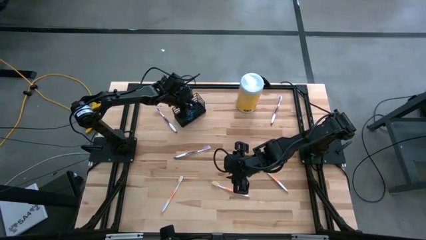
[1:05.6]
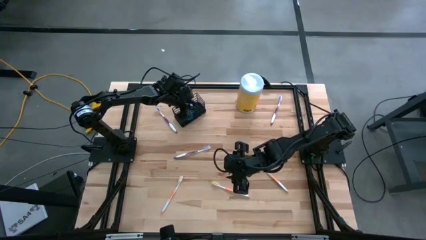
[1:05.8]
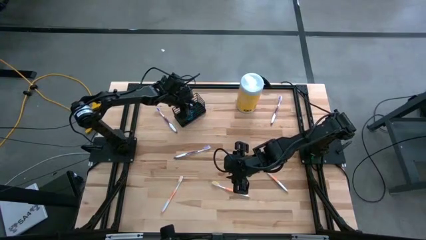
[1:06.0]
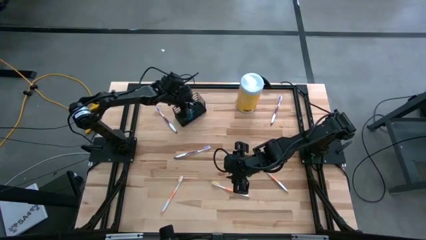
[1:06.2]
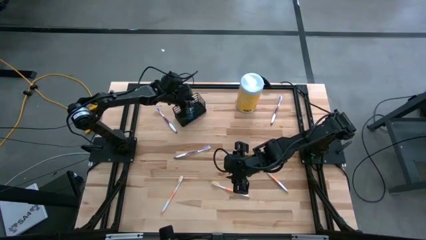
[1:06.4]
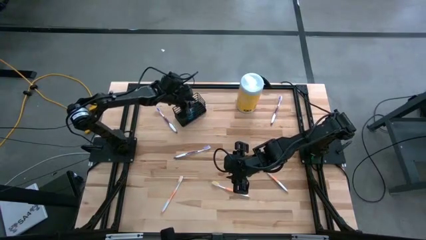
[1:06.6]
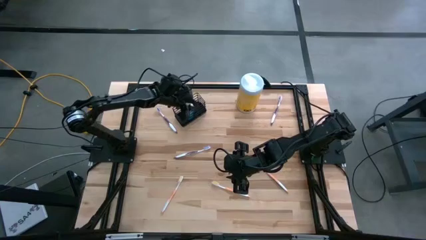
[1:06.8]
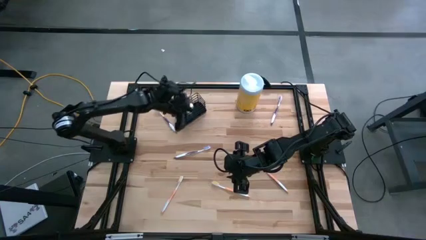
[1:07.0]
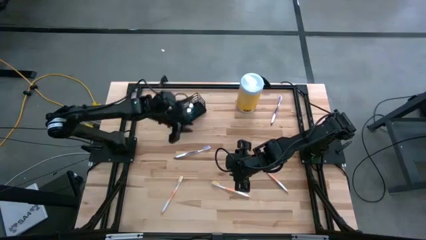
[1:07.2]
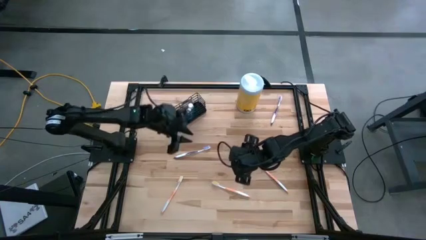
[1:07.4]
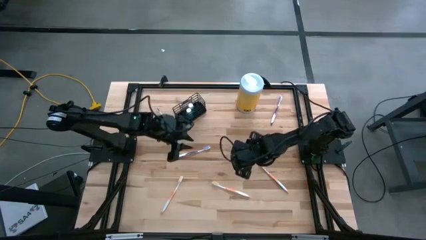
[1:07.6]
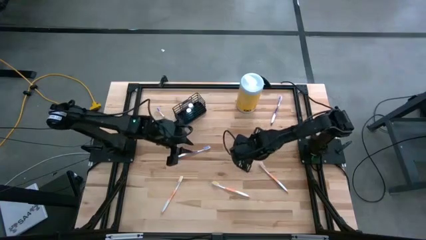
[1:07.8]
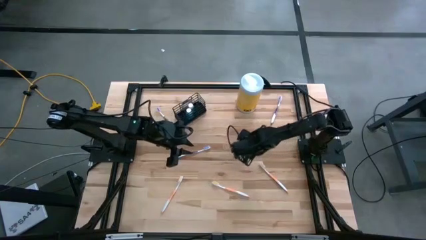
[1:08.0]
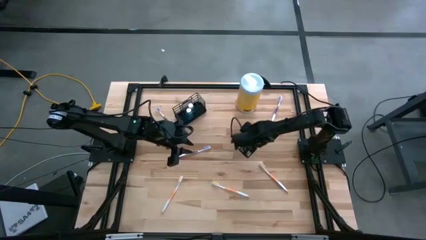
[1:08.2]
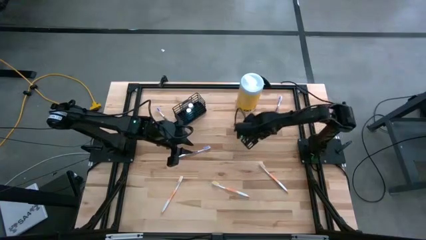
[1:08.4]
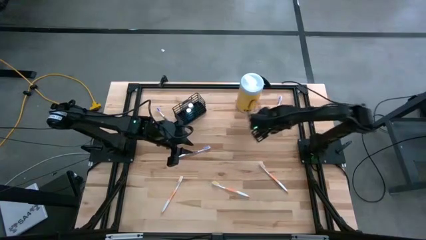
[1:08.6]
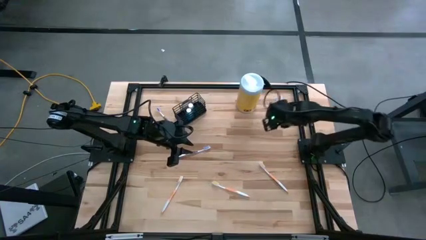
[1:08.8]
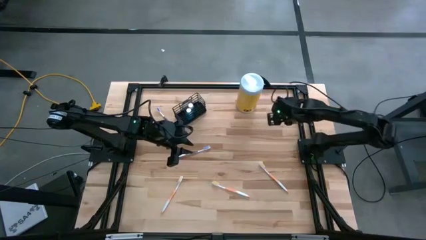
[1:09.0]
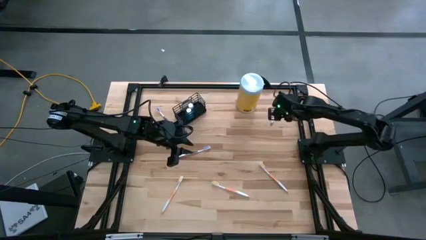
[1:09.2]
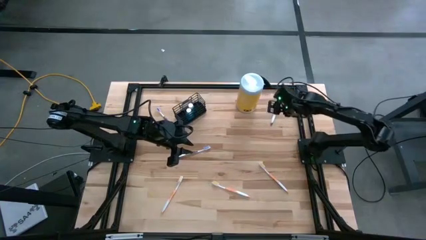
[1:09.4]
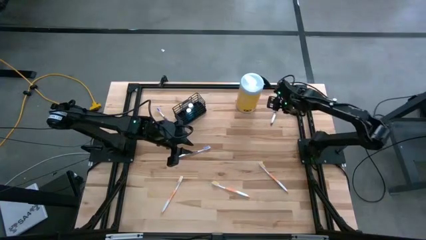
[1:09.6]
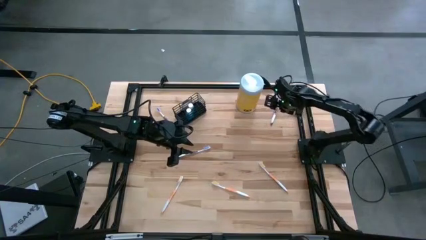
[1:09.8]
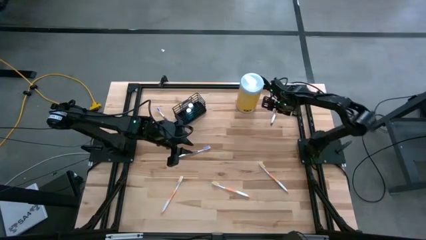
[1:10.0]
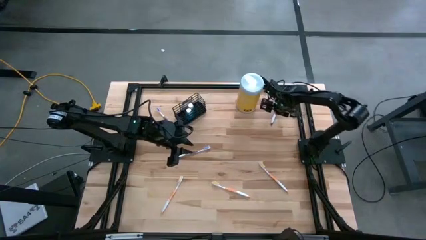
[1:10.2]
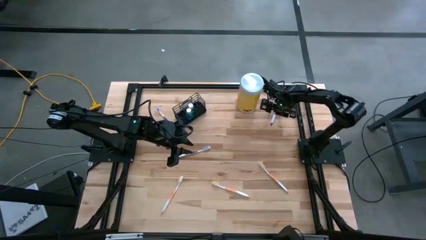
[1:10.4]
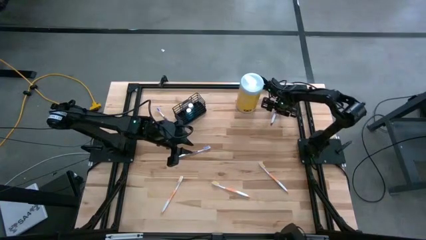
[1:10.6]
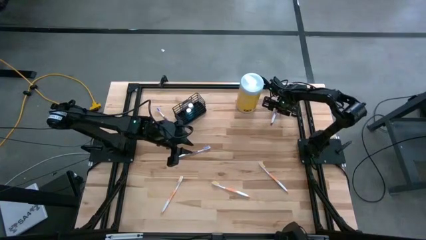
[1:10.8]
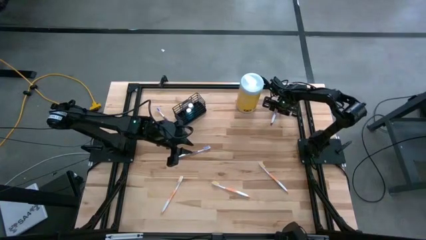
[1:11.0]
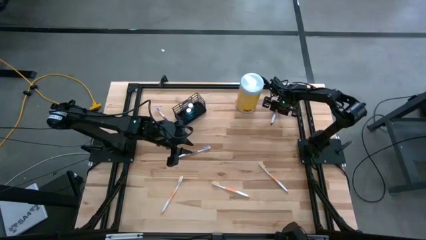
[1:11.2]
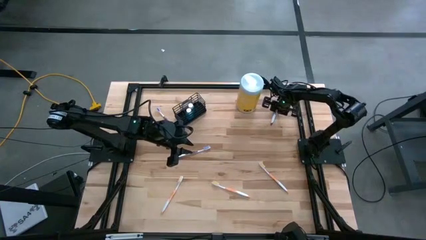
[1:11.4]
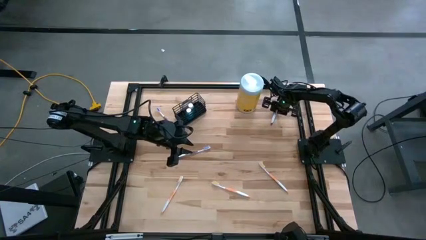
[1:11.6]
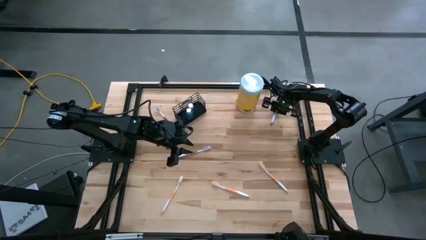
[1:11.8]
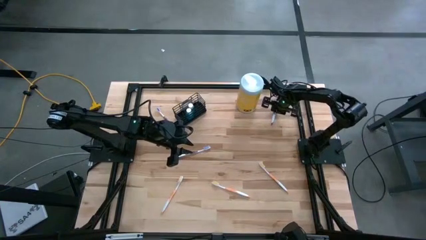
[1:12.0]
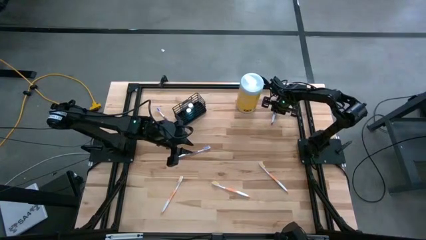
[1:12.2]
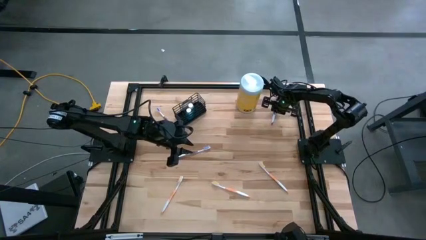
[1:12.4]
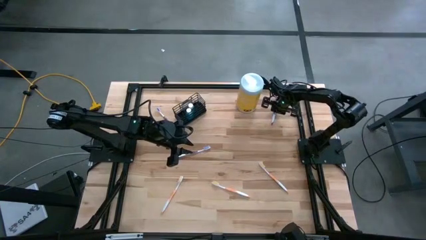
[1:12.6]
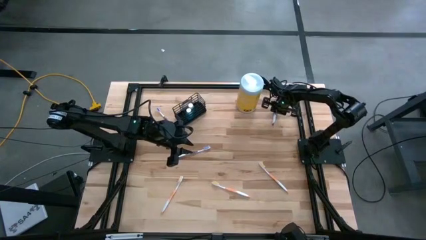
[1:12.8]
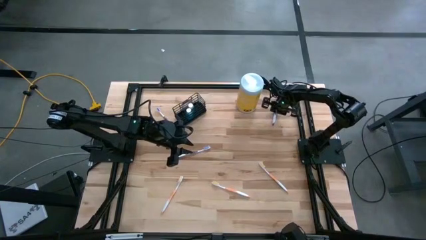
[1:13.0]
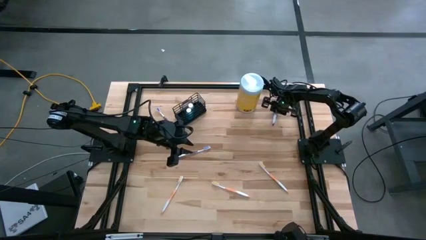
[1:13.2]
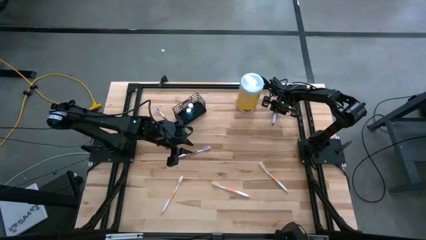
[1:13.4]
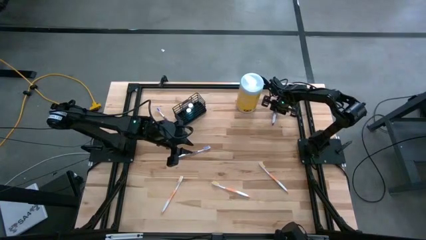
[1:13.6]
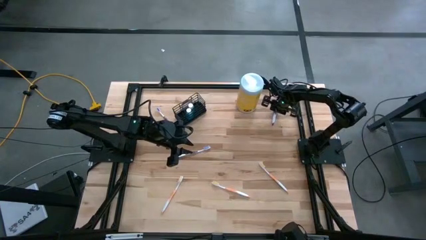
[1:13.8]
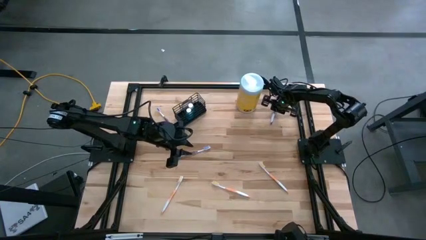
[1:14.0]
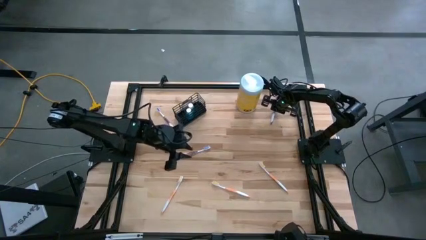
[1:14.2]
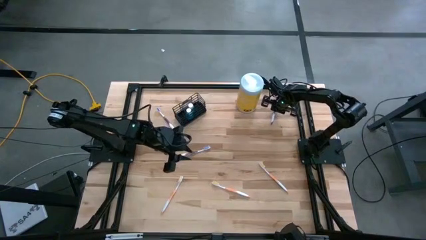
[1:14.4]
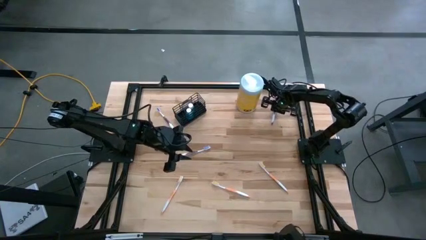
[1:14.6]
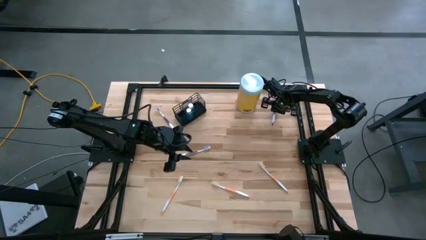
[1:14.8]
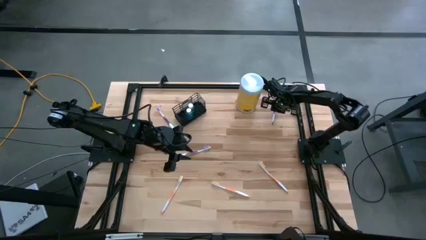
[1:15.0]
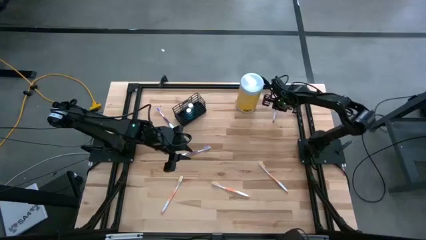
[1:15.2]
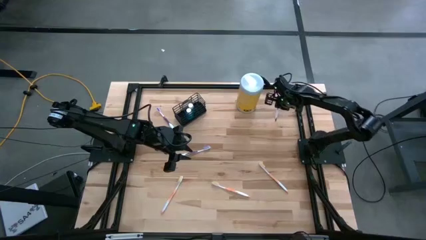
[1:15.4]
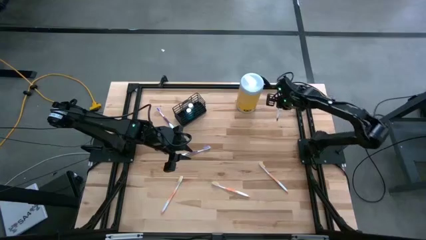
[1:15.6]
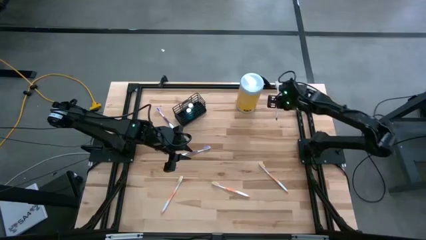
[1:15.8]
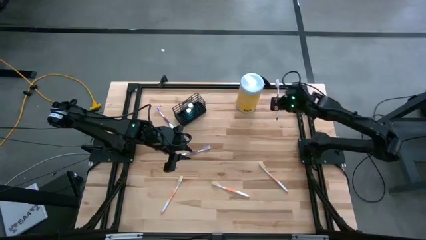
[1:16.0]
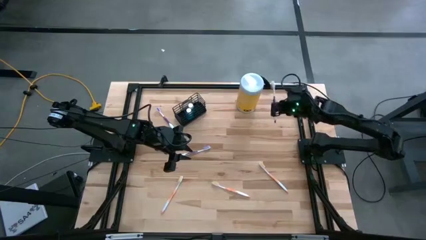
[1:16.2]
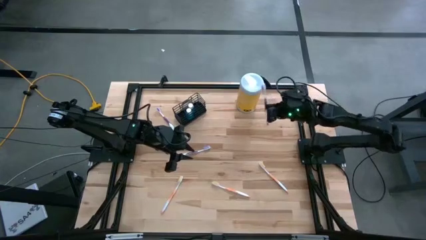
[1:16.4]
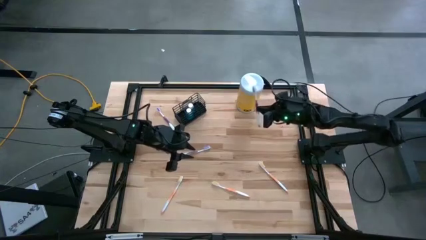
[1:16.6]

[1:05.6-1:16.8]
Task: Pick & Place toothbrushing station
Put the top right purple toothbrush into the right section of the wire organizer

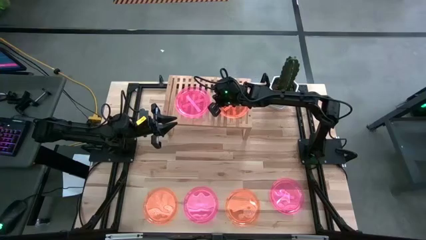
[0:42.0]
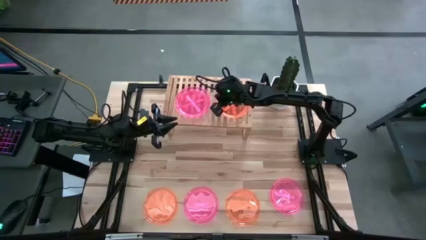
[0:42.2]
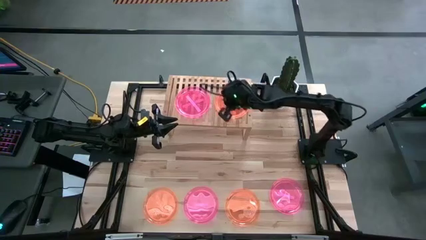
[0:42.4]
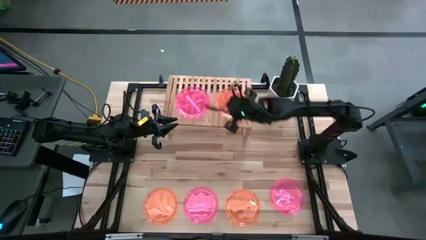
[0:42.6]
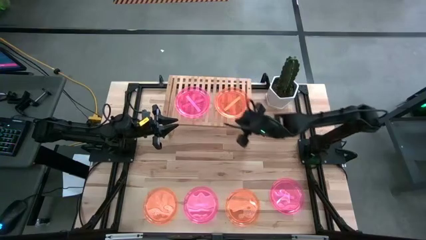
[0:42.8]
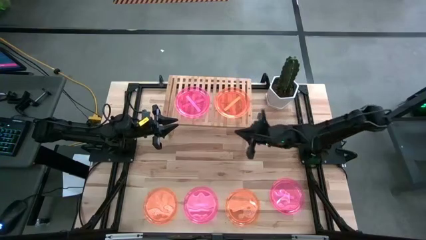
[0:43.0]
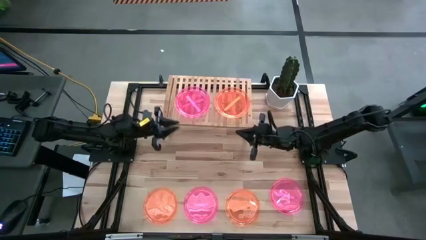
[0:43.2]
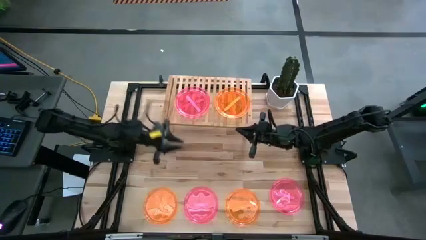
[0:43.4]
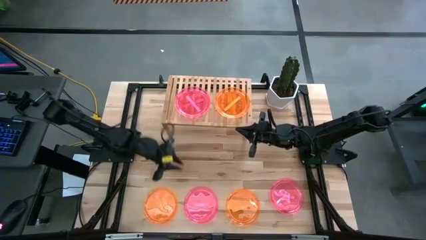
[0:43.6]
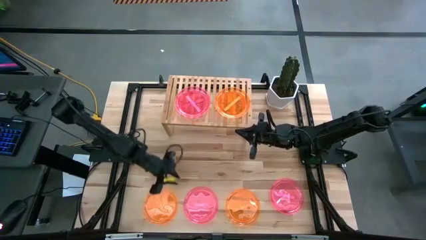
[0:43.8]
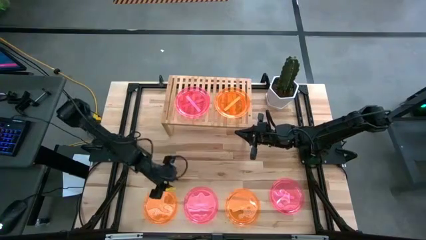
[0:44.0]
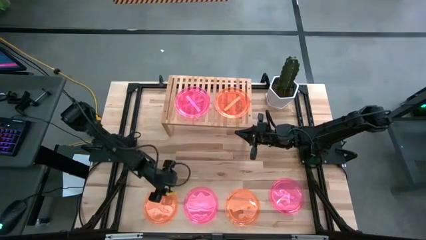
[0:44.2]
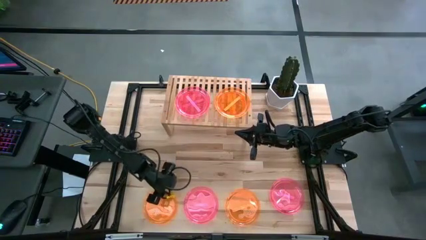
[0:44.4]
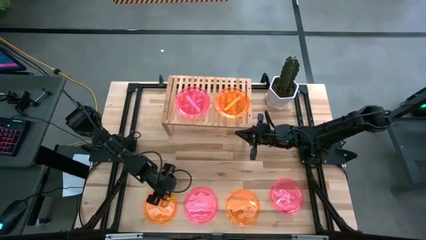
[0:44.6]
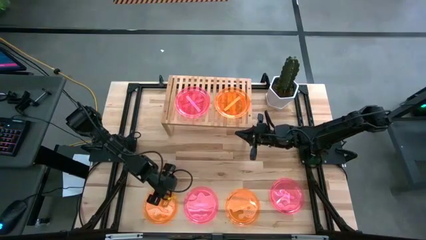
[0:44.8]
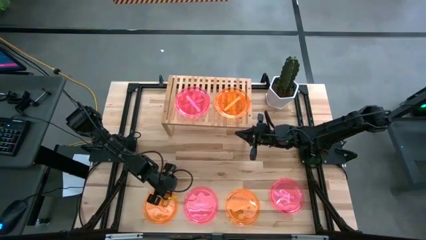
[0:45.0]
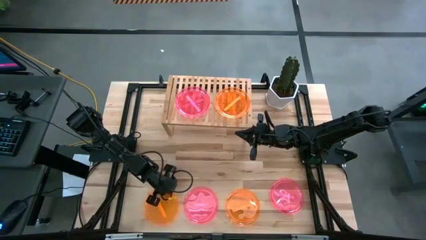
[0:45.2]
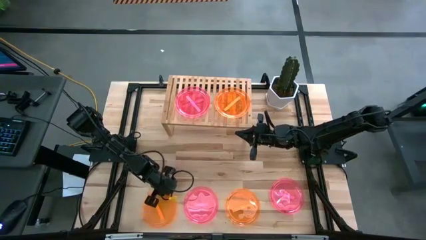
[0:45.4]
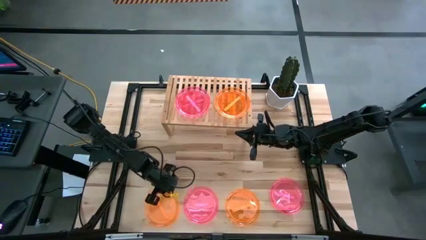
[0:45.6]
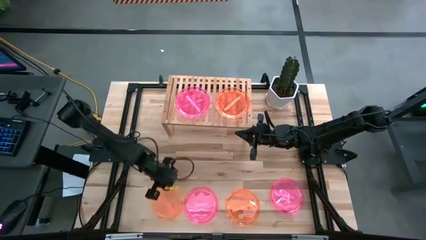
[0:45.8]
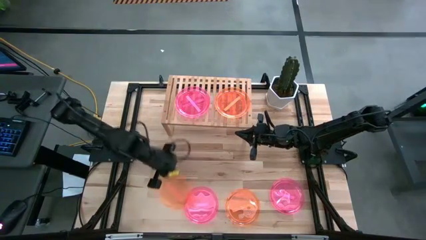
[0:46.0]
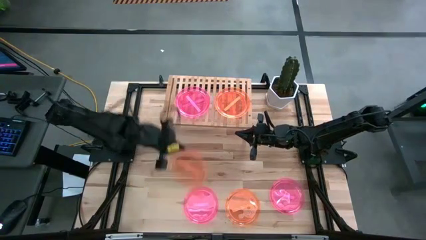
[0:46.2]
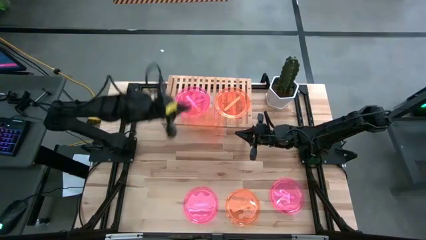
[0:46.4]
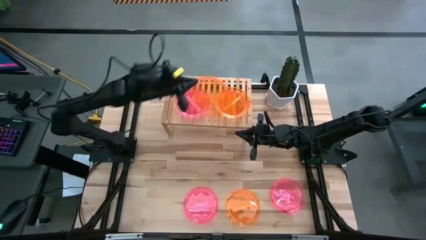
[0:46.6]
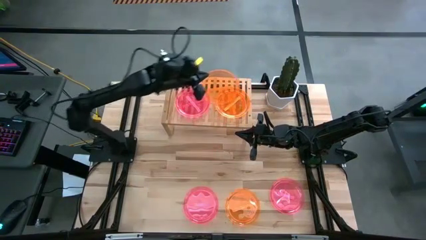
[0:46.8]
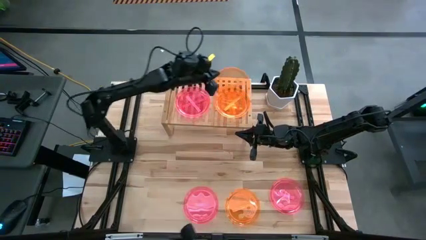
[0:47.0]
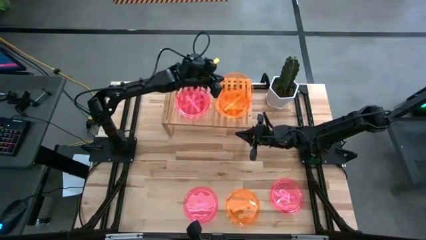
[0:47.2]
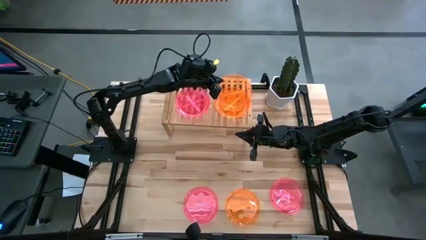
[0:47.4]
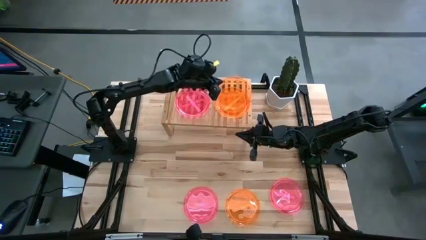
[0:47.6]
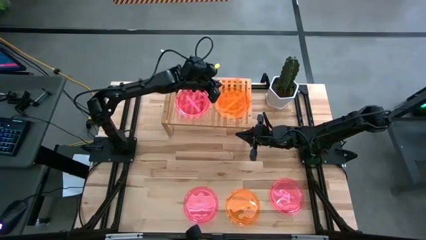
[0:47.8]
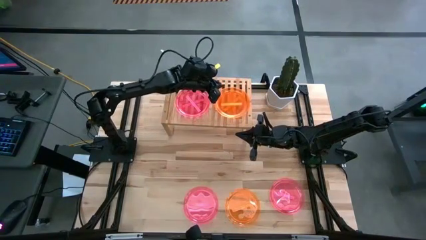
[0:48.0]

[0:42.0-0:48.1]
Task: Place and stack plates onto a shelf
Stack the orange plate on top of the other orange plate on the shelf
